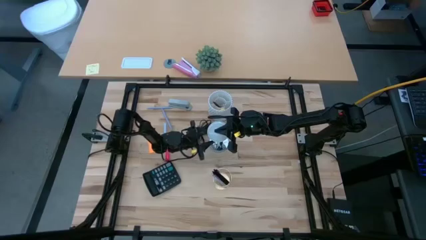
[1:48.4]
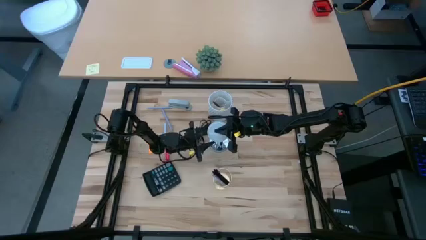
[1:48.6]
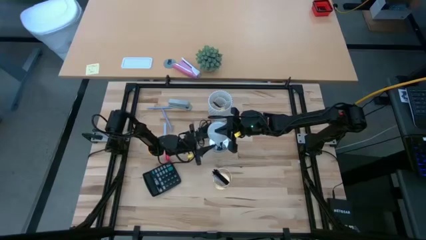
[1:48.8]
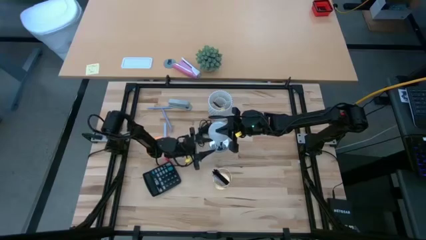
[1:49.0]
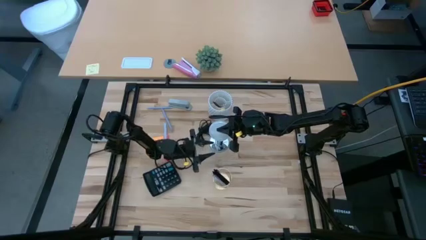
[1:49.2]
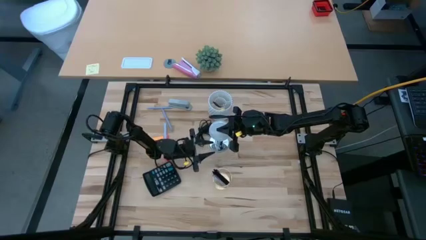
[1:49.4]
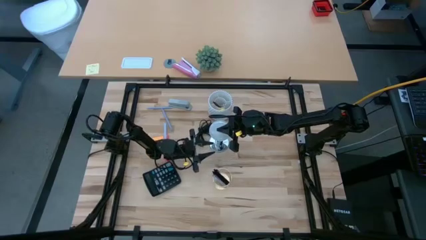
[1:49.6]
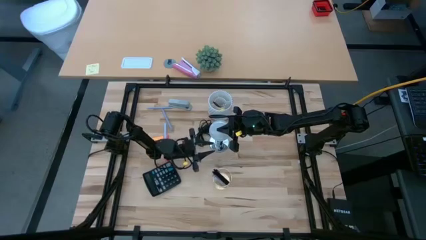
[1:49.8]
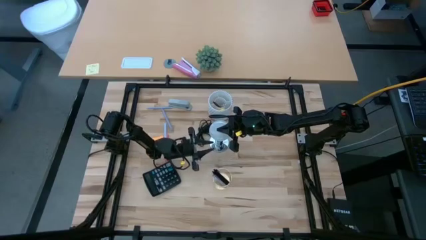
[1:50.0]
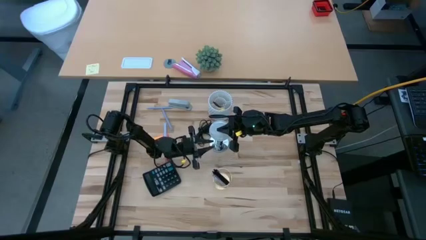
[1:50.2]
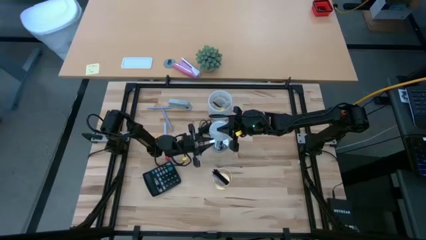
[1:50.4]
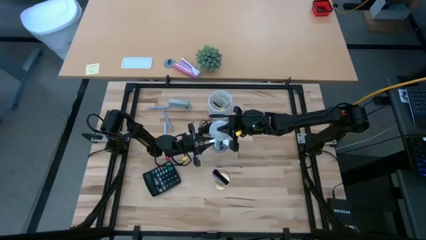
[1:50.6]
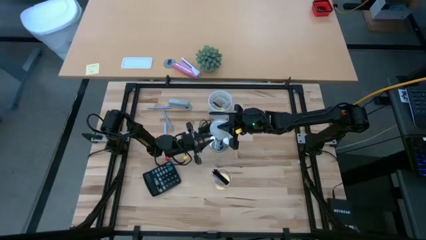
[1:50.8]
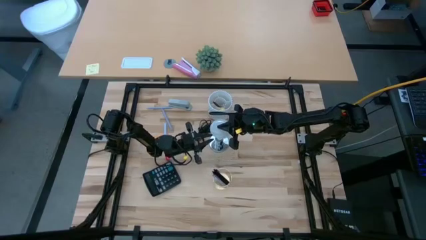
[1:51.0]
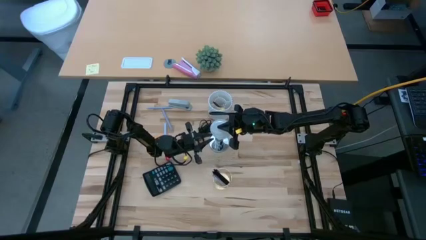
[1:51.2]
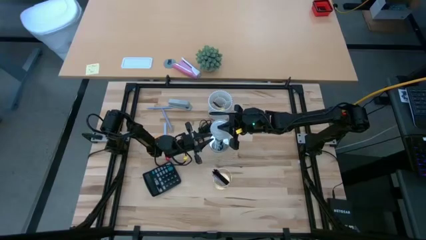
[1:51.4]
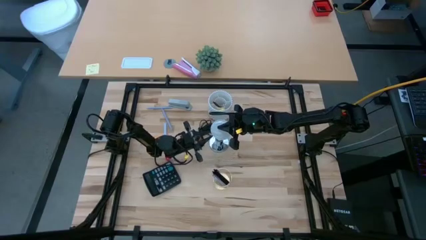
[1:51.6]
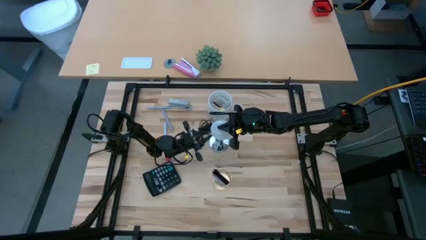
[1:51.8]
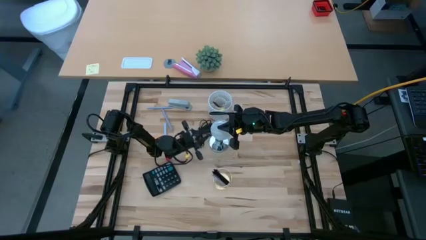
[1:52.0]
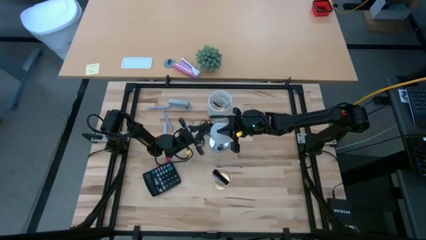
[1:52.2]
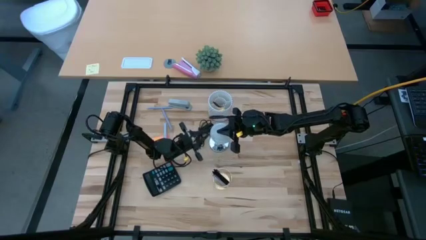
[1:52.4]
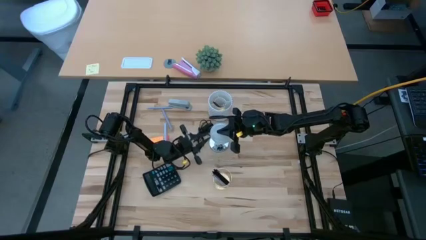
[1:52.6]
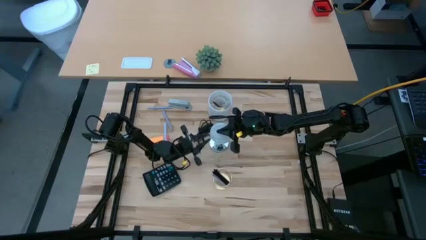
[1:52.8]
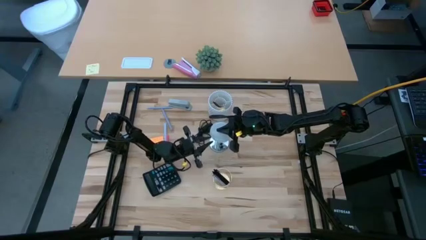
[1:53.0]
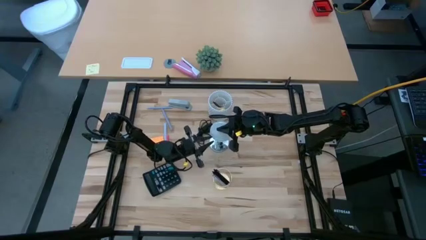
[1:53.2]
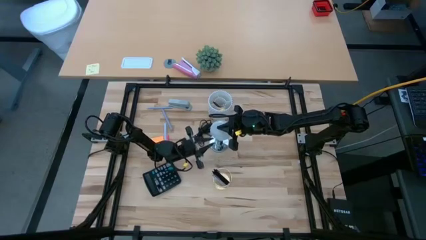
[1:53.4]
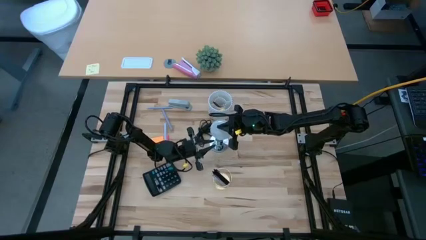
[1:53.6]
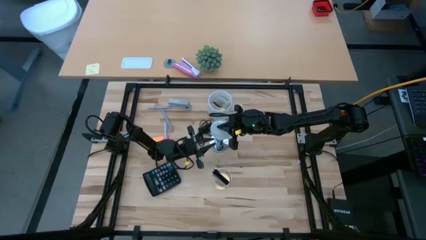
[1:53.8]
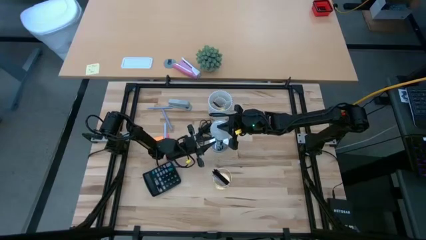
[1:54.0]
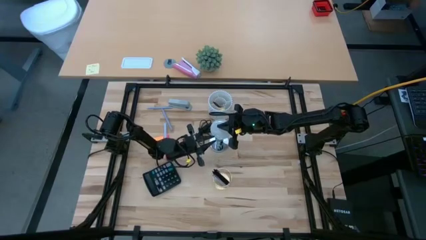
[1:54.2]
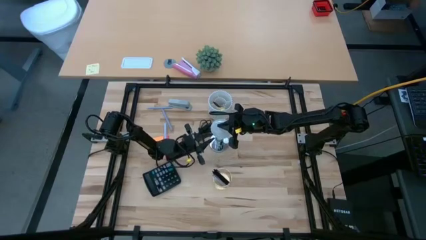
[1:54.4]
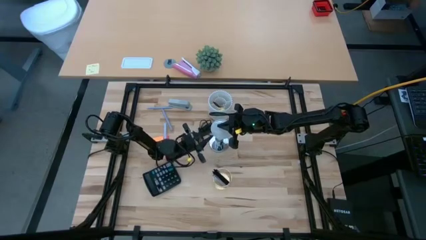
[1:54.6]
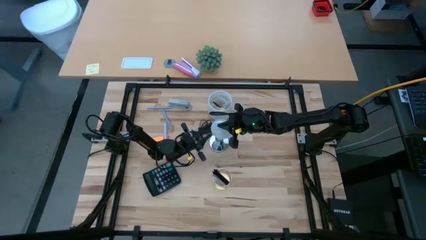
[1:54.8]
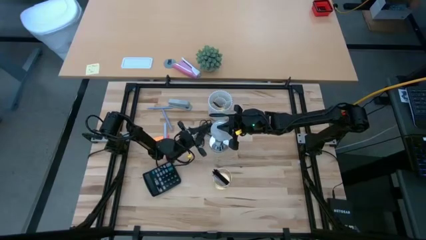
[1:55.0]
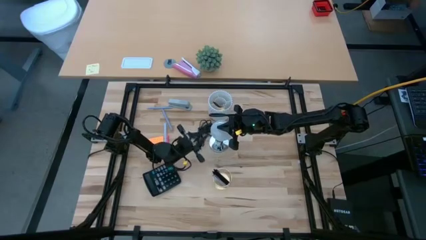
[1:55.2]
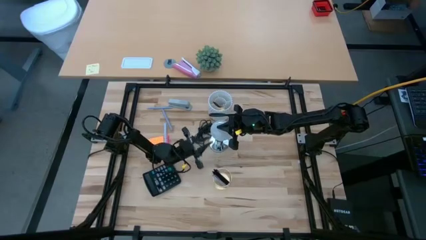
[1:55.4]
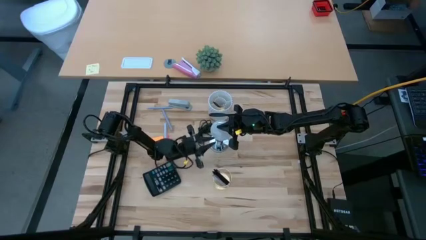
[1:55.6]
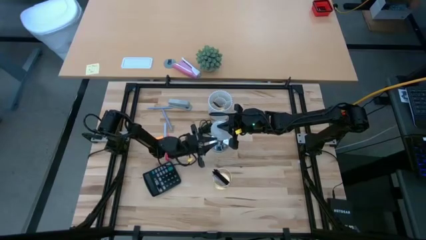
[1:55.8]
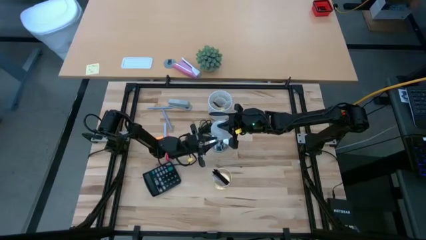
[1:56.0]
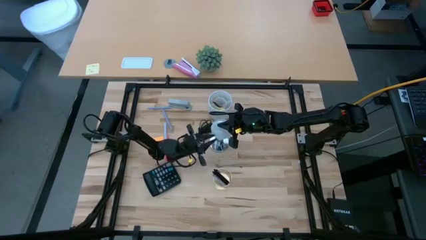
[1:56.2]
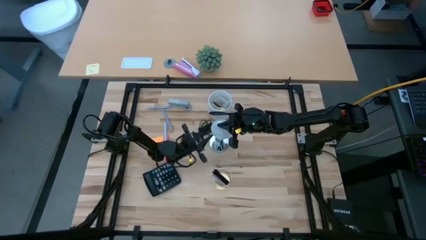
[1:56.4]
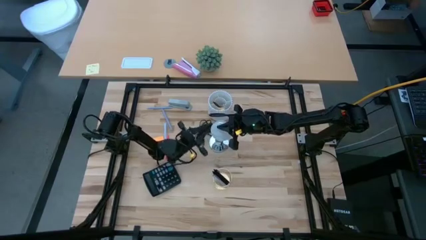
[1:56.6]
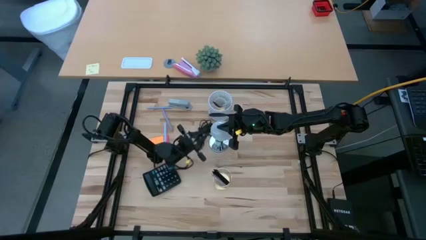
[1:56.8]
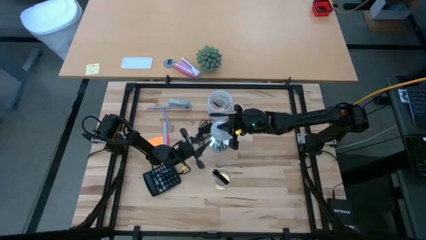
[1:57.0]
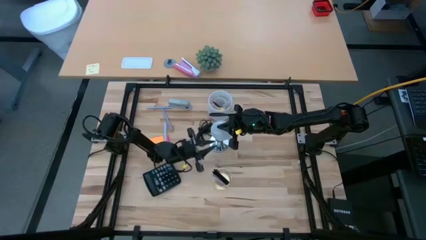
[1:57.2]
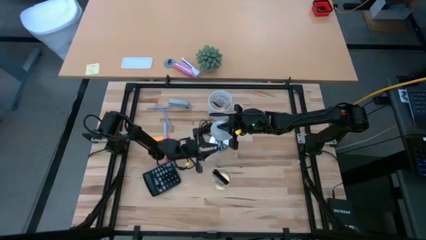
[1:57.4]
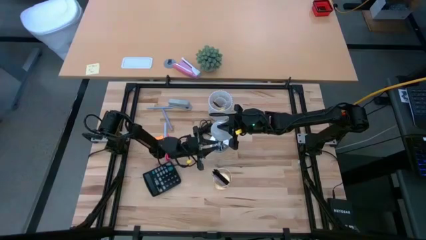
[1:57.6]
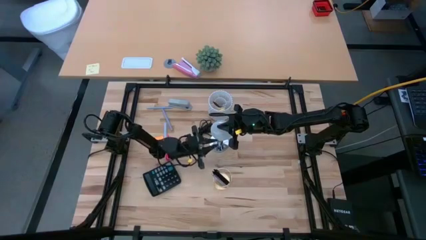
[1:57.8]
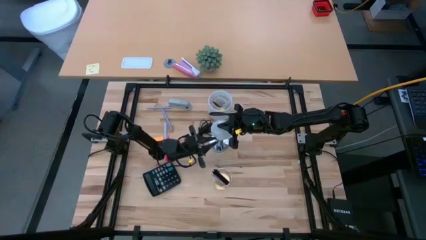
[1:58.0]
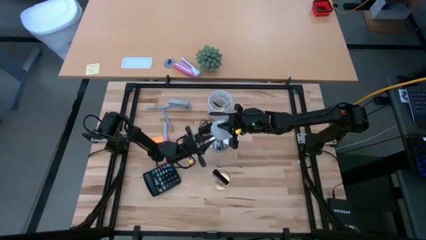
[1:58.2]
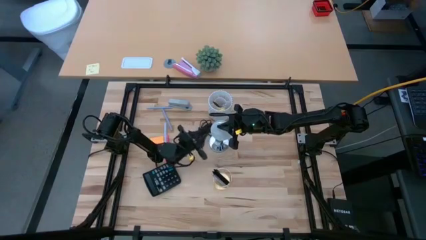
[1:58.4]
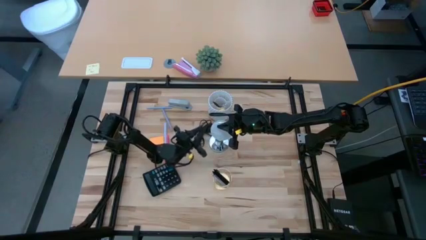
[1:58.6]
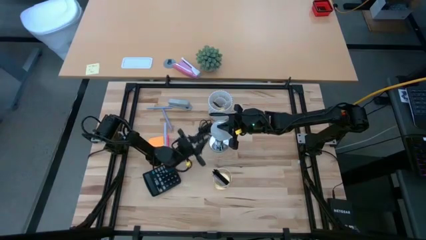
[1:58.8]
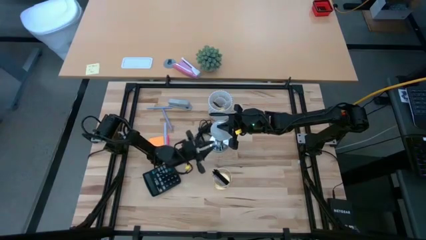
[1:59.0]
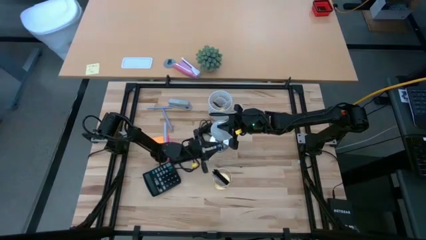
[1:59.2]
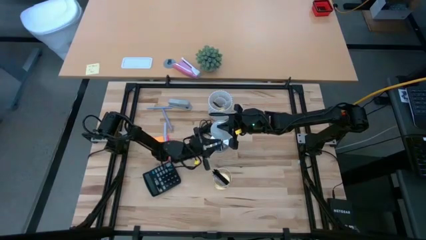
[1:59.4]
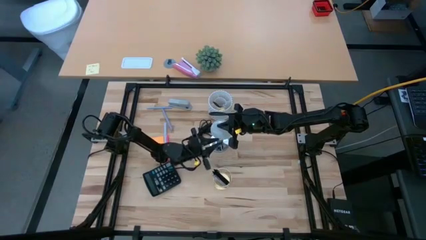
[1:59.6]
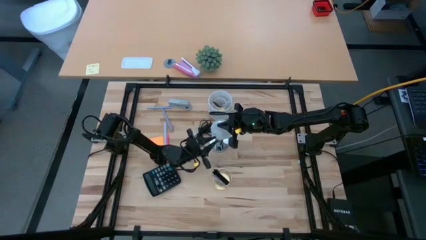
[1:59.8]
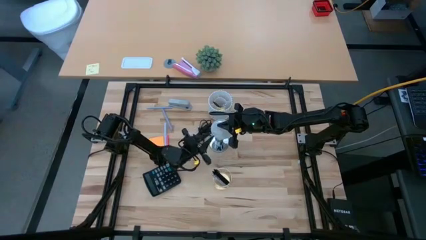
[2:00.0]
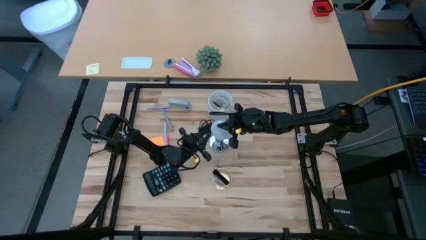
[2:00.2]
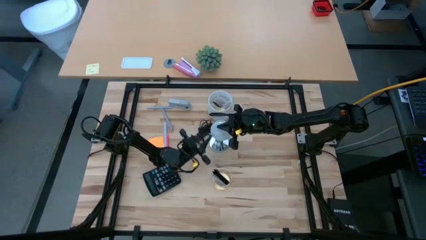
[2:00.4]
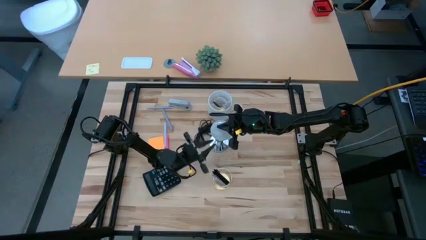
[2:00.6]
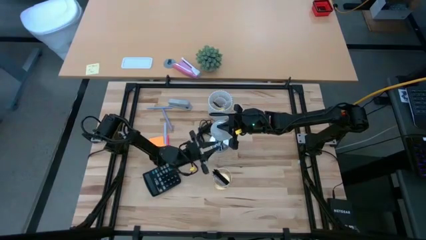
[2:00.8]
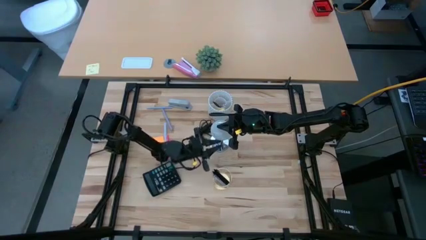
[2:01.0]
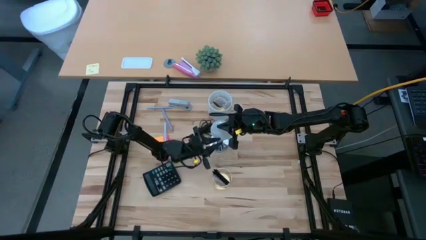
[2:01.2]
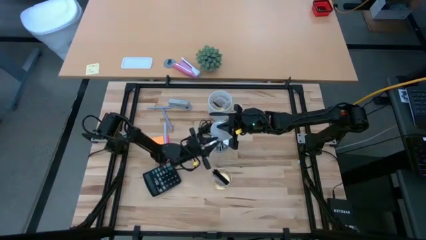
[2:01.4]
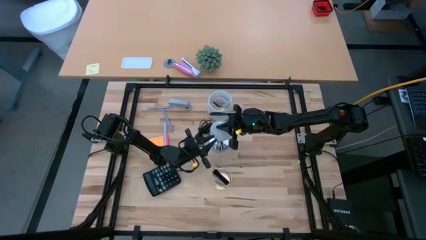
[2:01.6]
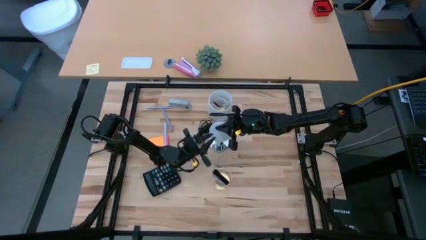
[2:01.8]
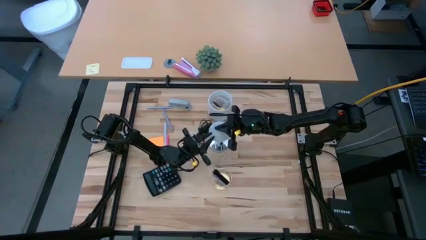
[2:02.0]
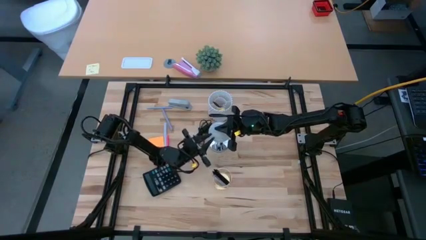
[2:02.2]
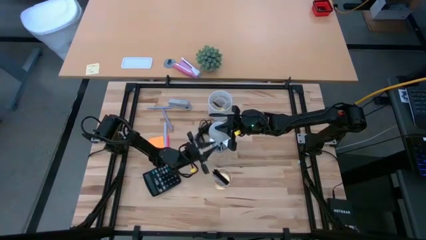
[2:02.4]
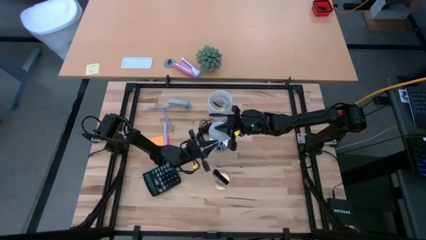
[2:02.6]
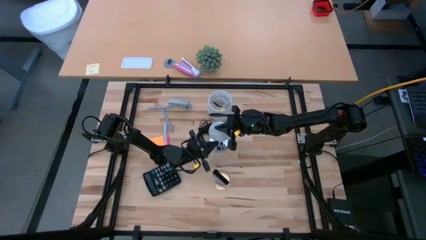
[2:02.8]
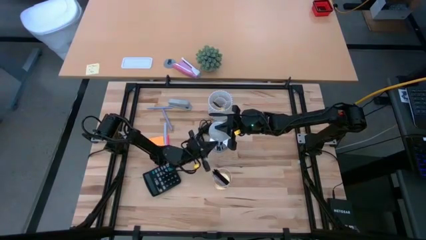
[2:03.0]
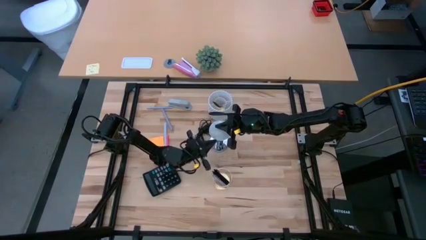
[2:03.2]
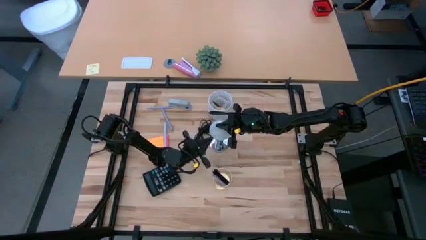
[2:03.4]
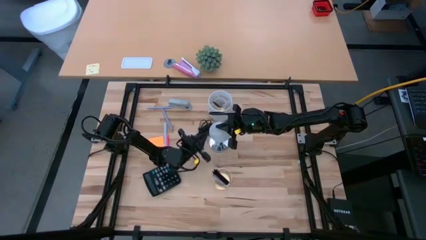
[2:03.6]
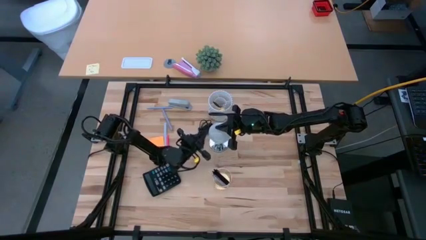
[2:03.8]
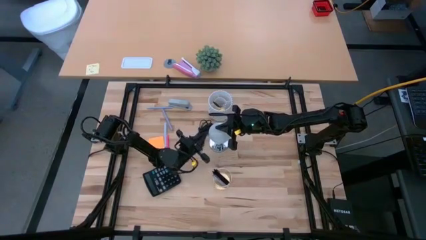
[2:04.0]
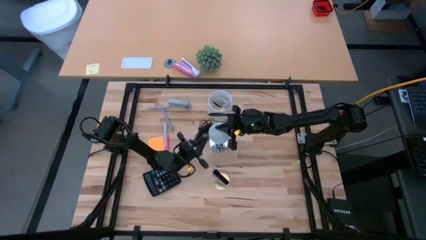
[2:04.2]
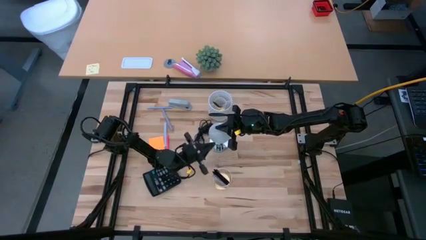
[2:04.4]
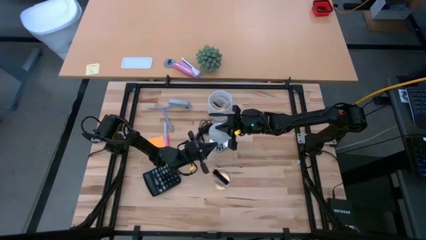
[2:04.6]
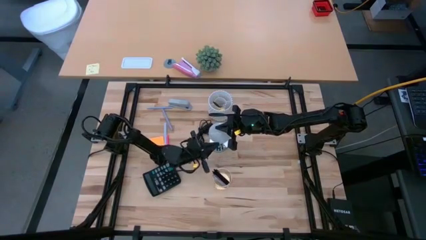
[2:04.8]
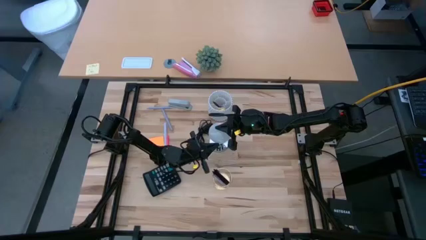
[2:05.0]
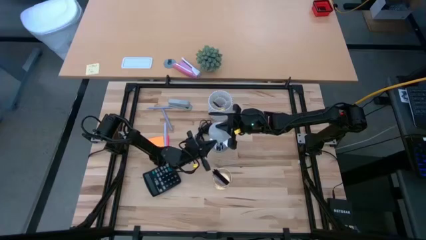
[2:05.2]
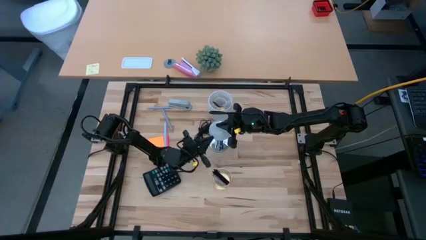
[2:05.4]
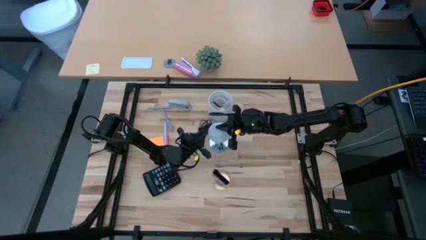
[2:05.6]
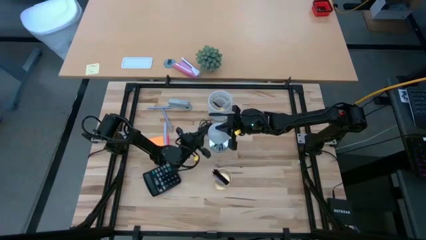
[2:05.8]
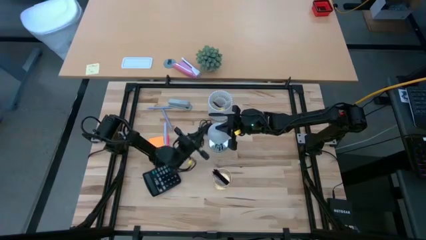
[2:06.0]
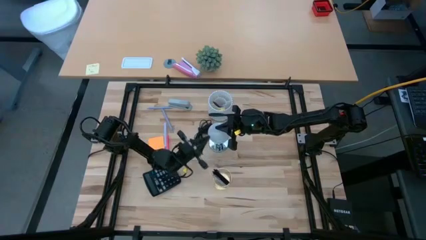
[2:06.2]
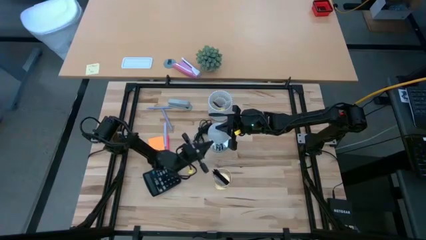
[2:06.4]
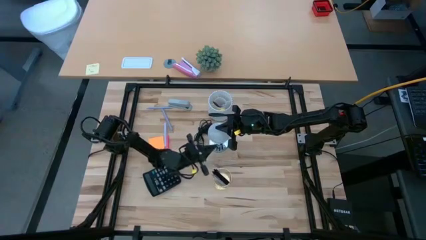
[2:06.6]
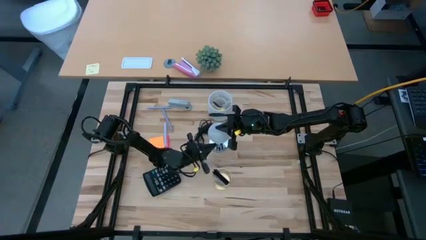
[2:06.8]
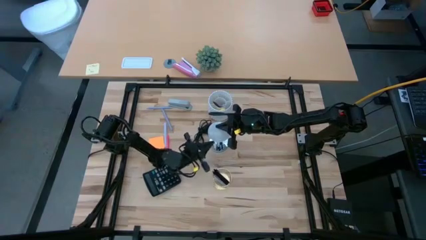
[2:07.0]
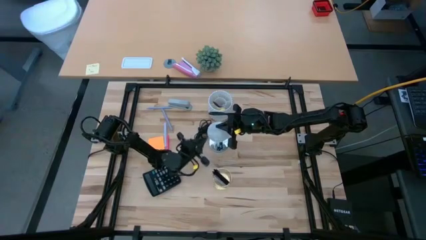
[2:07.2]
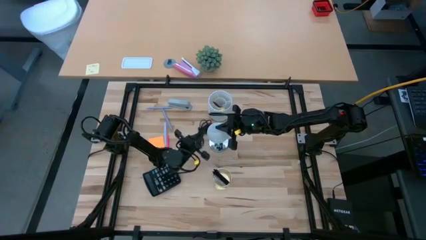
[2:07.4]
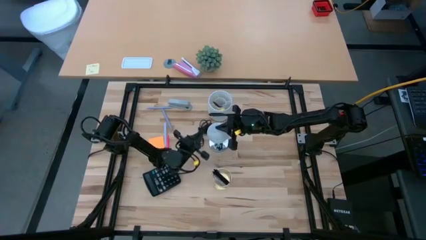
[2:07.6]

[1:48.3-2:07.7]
Task: Screw lightbulb
Insert the lightbulb into the lamp
